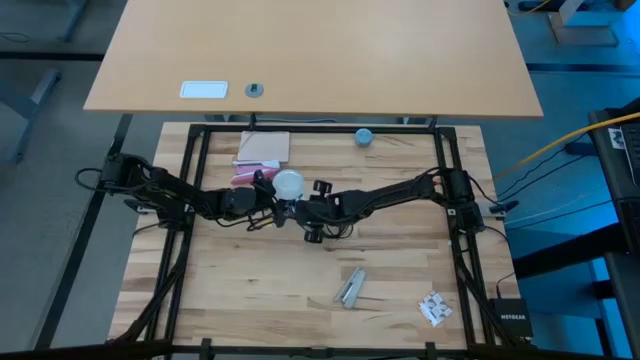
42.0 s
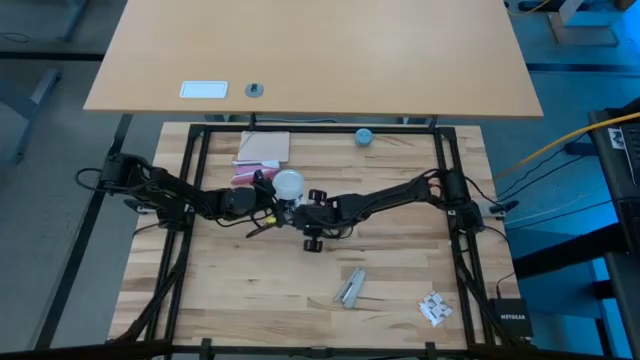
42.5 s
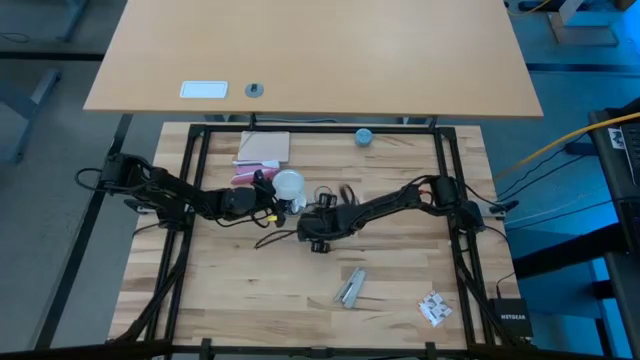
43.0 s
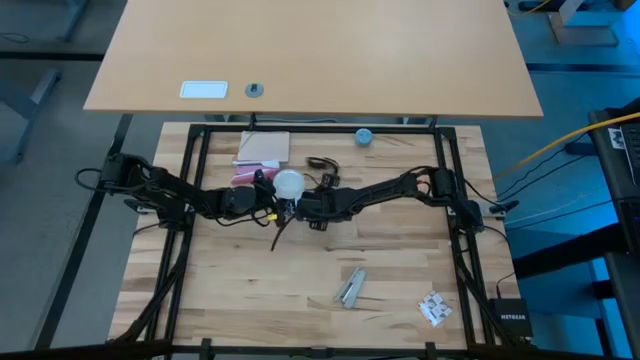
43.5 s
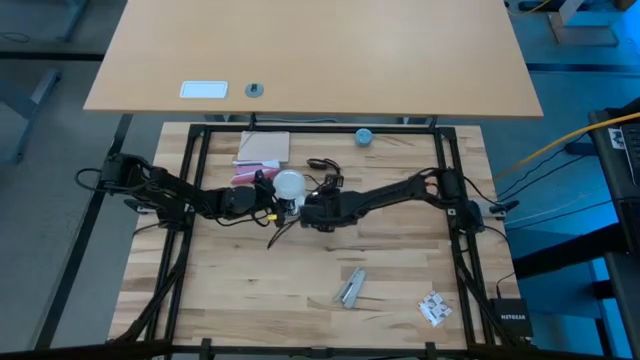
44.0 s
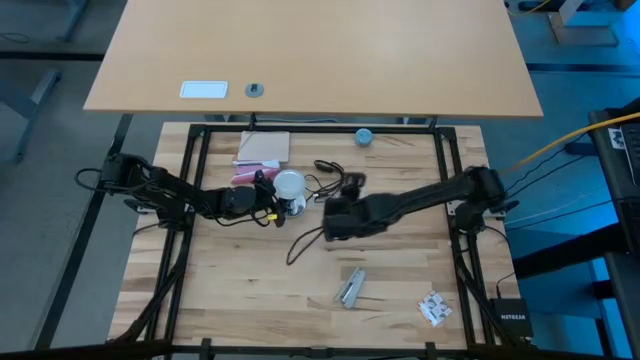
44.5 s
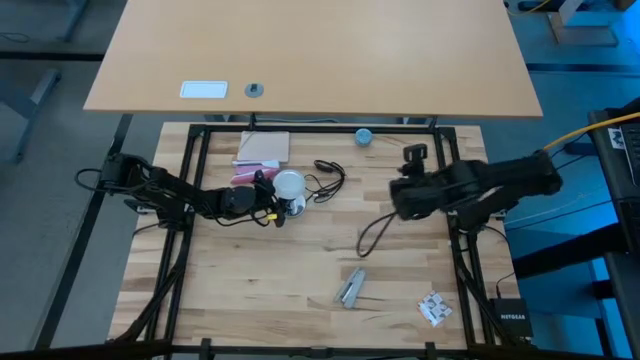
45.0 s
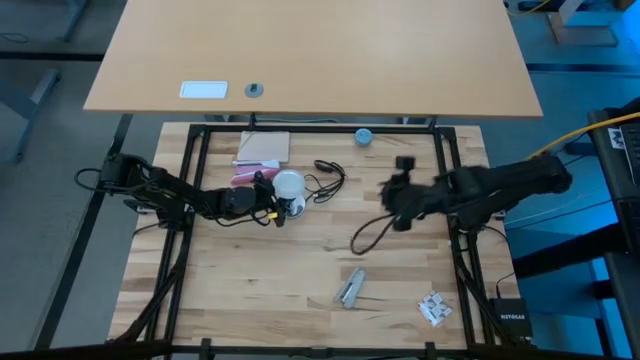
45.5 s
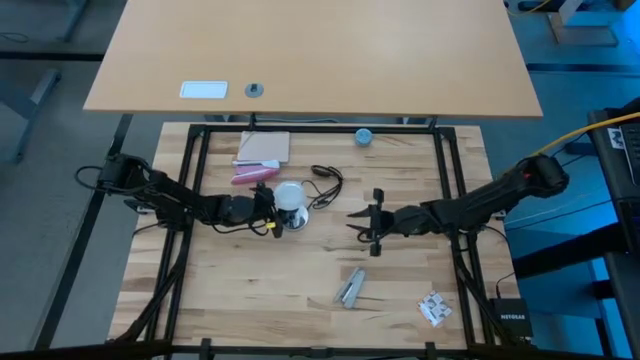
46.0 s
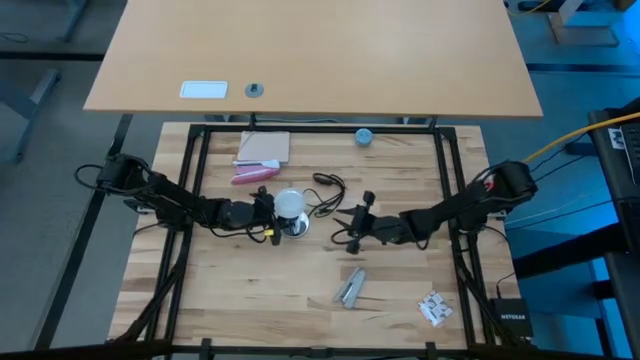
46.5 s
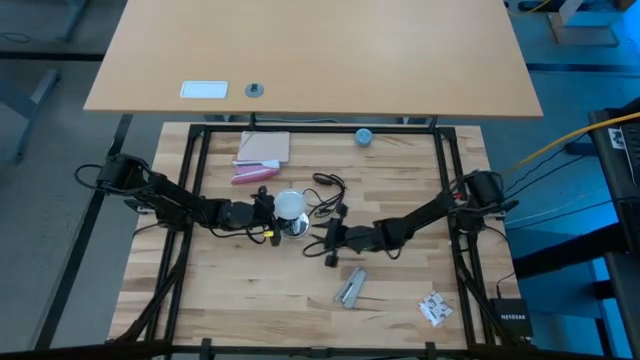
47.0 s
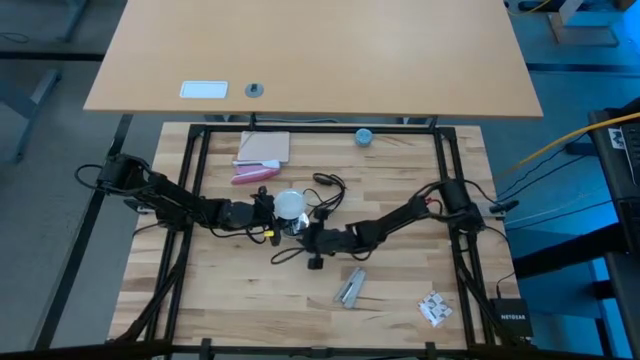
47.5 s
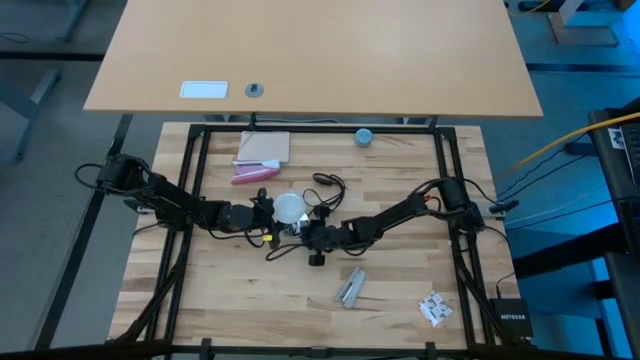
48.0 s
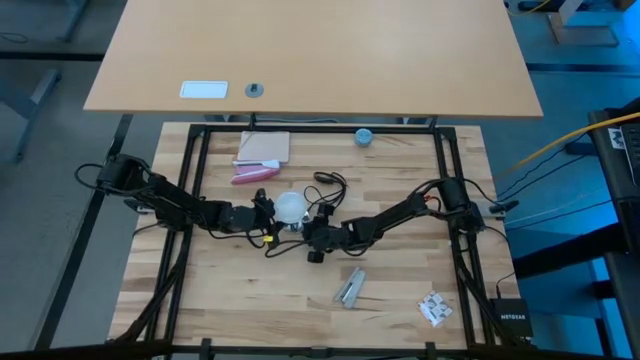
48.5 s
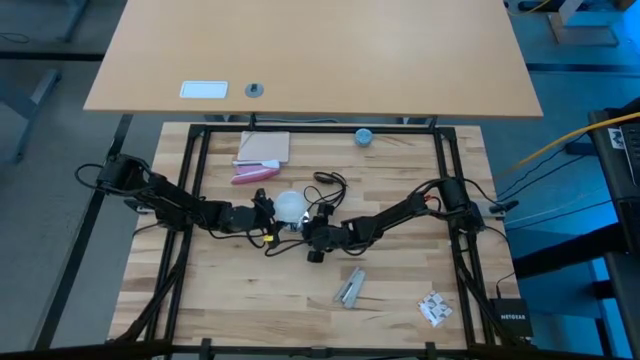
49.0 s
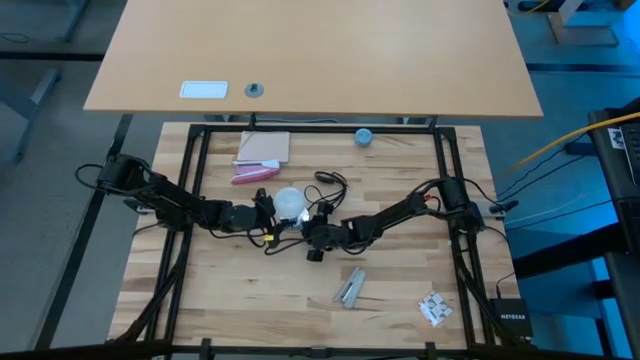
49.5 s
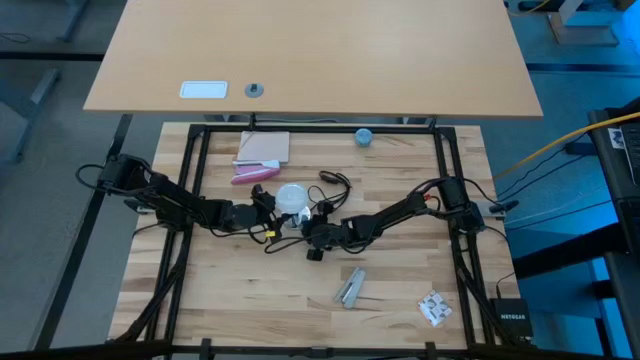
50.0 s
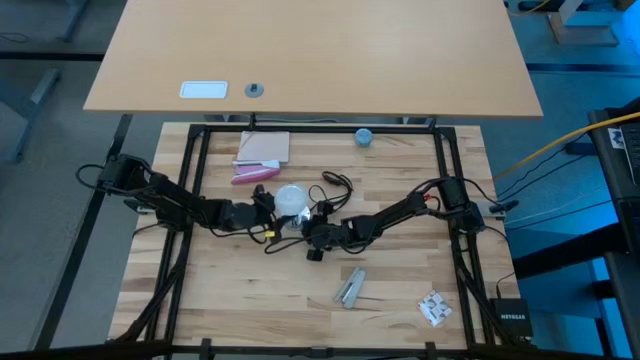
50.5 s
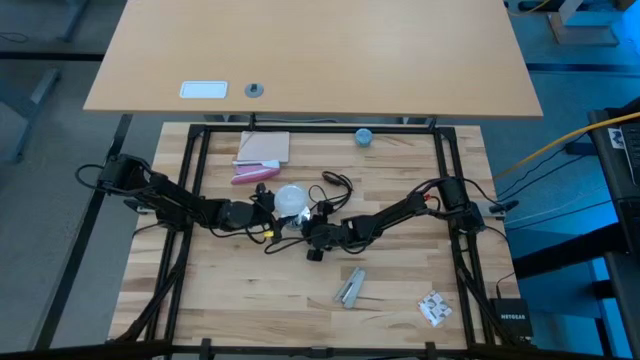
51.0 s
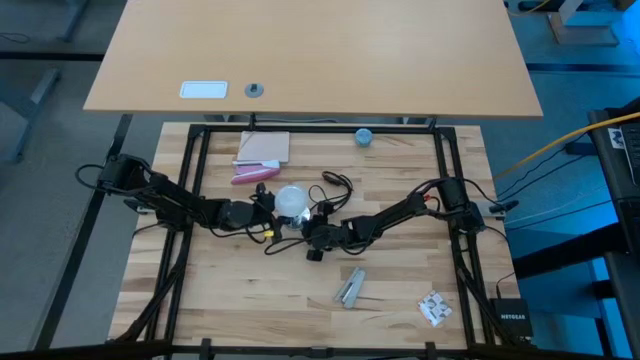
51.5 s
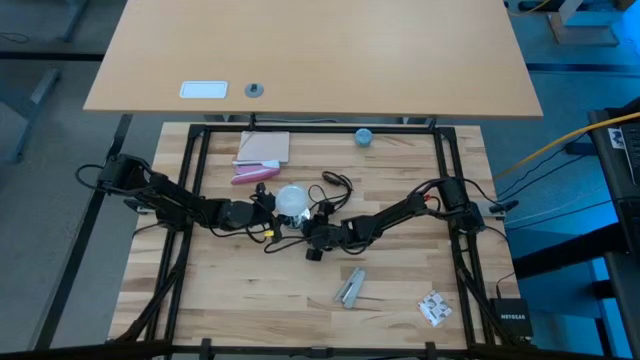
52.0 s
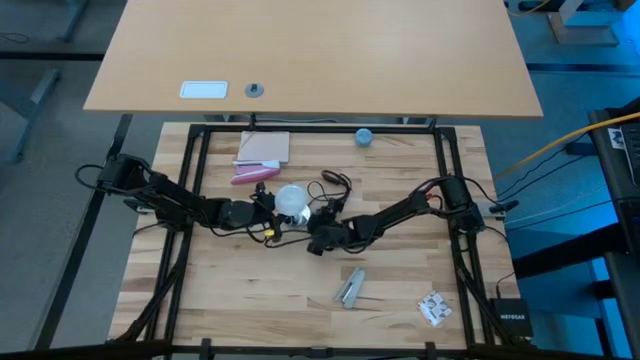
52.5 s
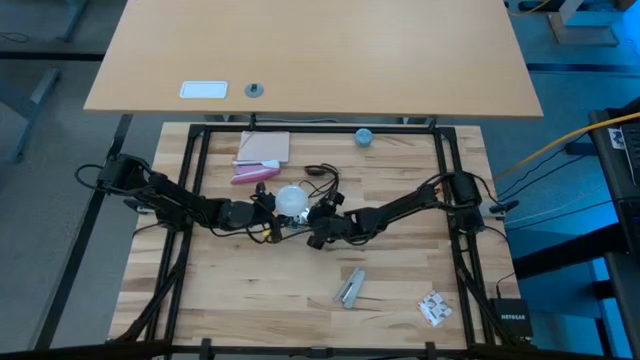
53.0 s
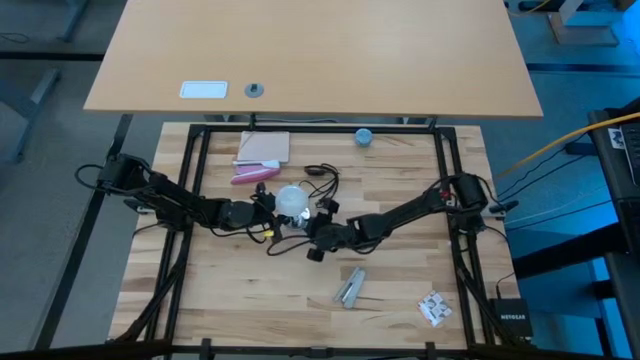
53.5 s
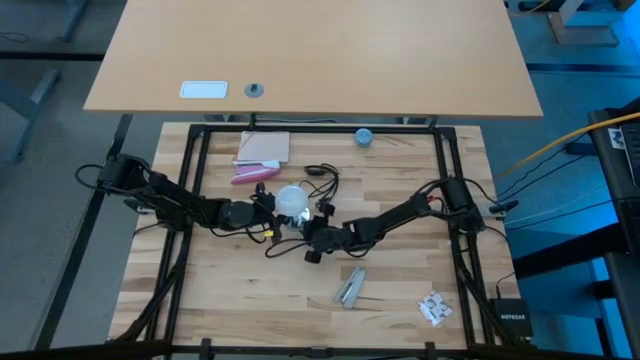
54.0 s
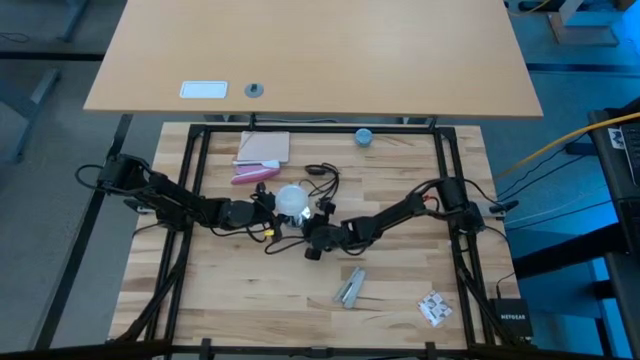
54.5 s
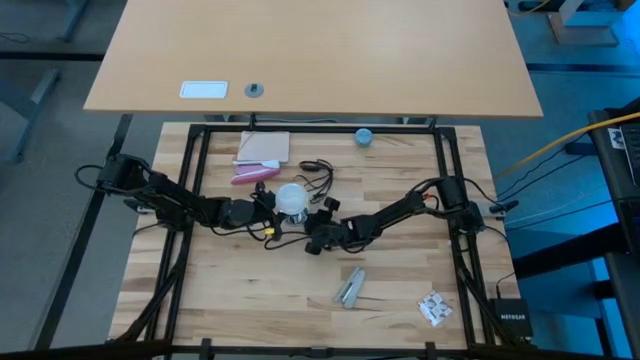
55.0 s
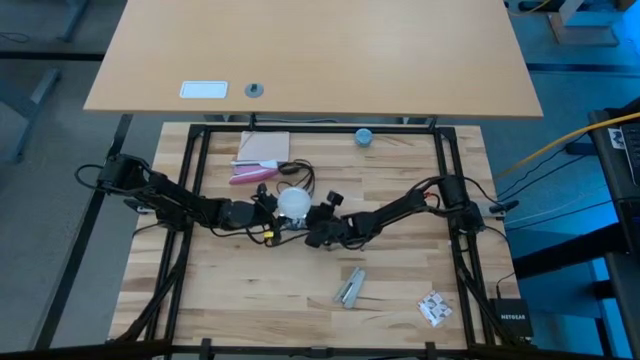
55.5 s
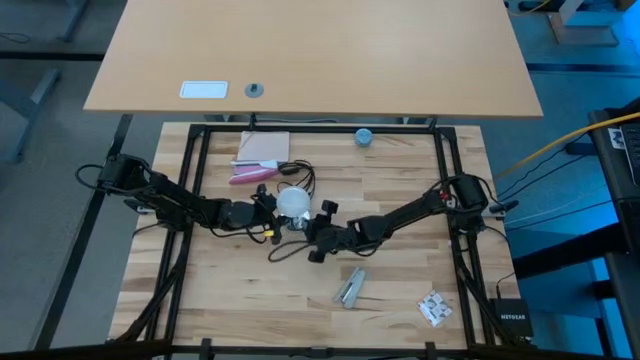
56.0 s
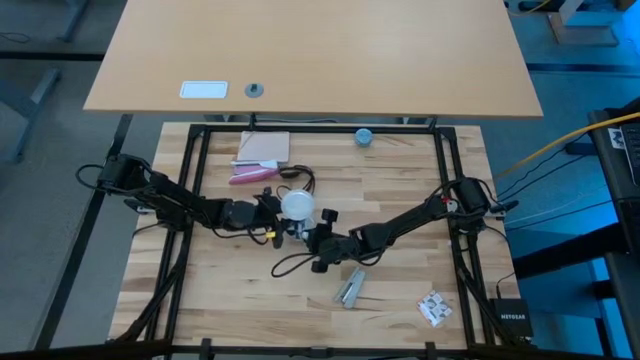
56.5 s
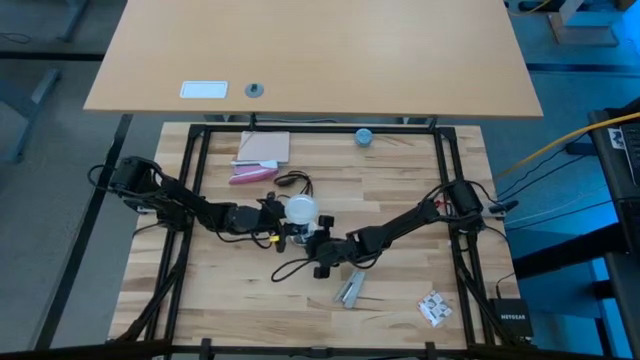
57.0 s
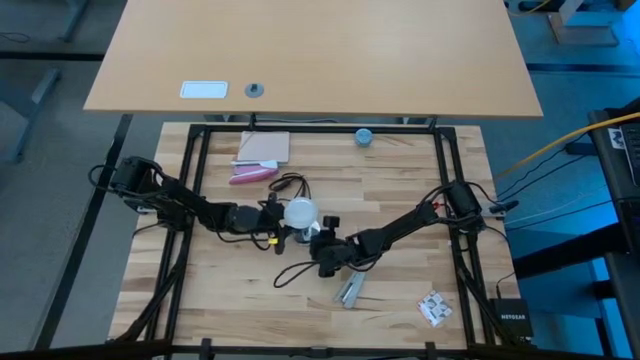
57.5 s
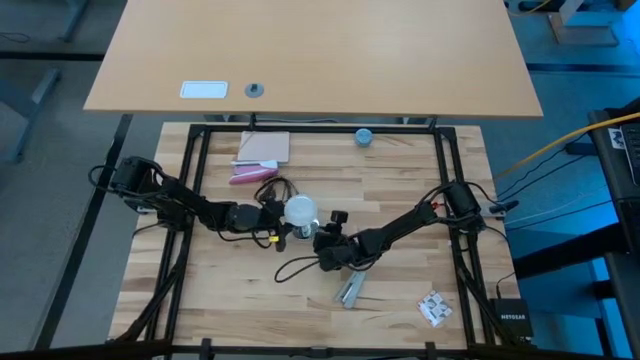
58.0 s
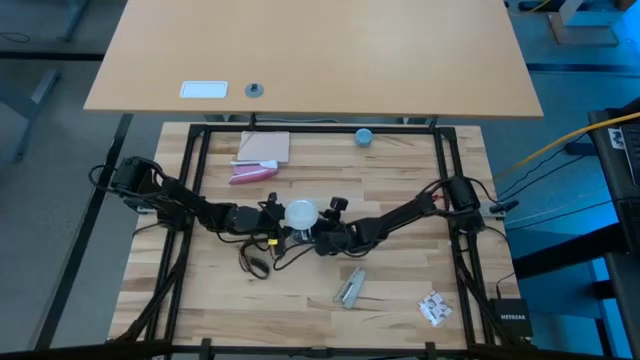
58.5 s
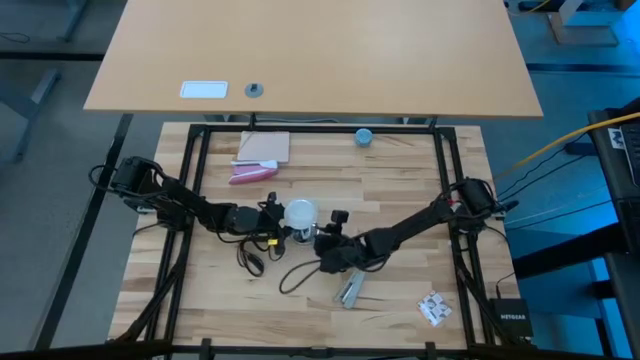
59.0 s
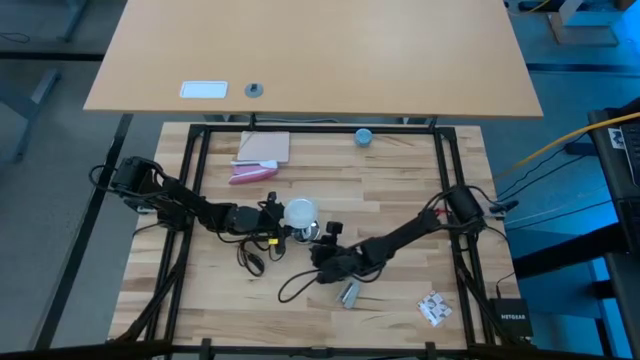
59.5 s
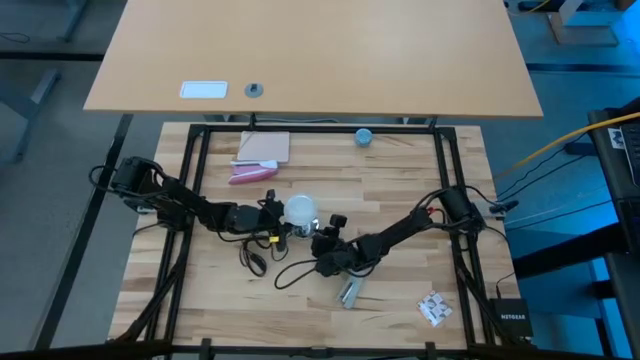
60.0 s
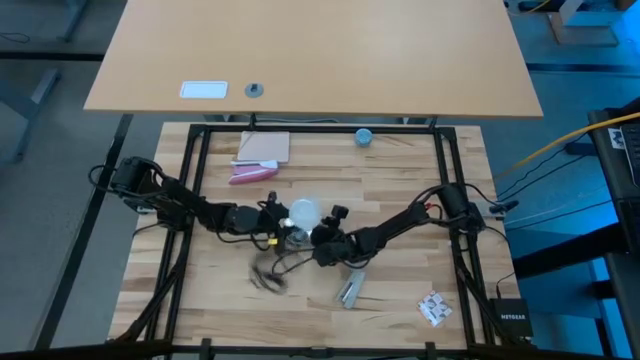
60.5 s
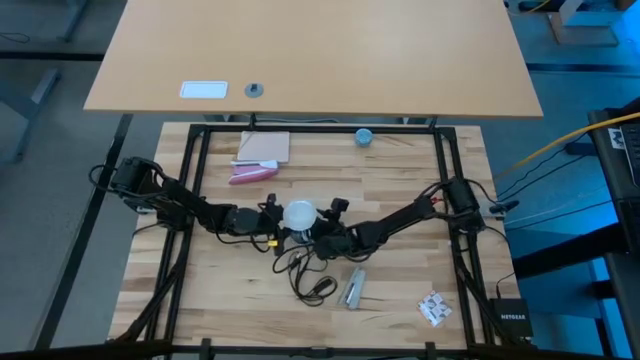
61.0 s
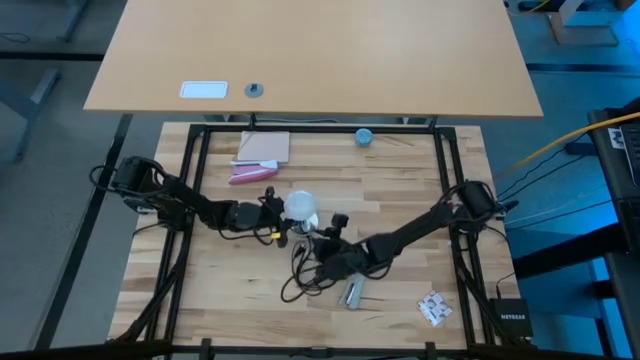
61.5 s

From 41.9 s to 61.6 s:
Task: Screw lightbulb
Insert the lightbulb into the lamp

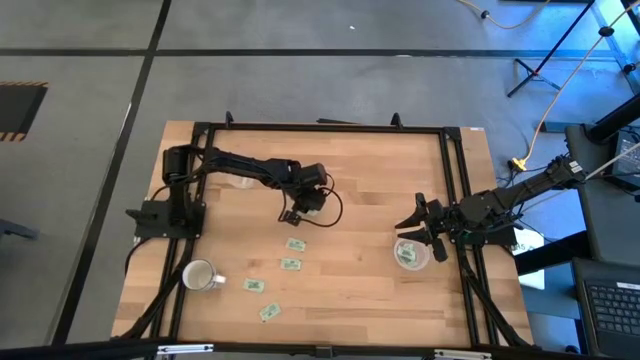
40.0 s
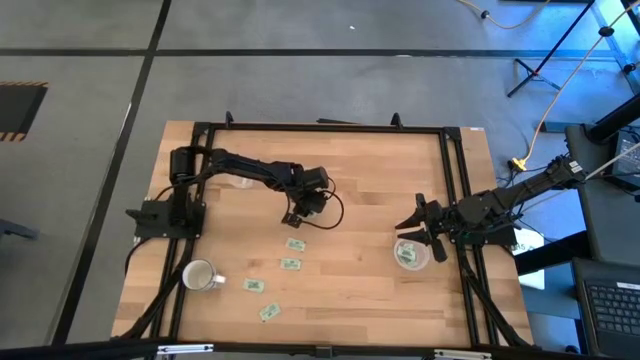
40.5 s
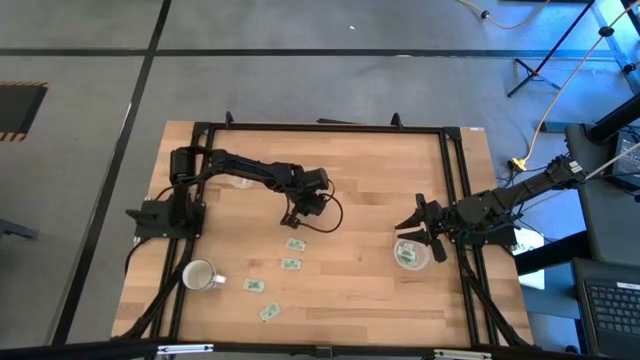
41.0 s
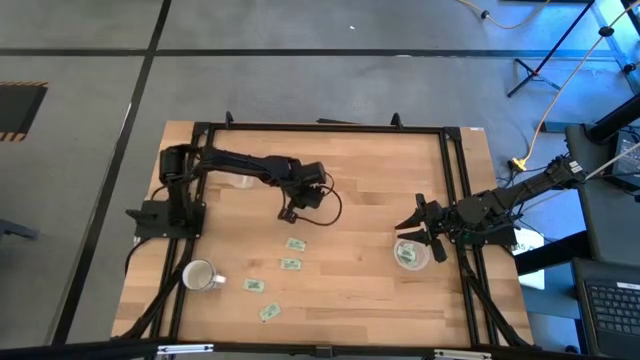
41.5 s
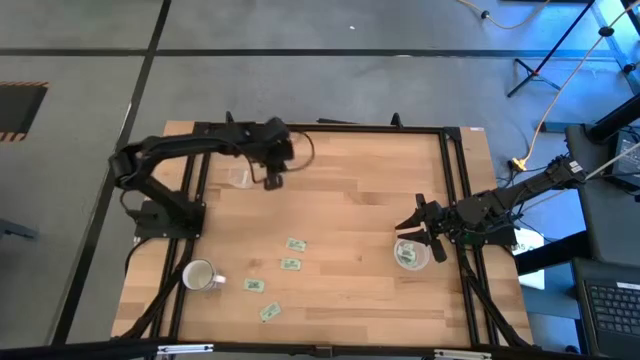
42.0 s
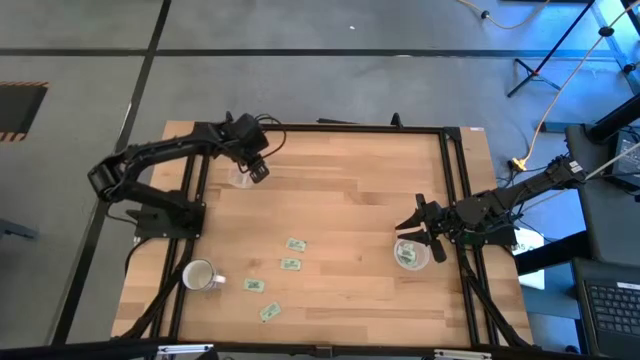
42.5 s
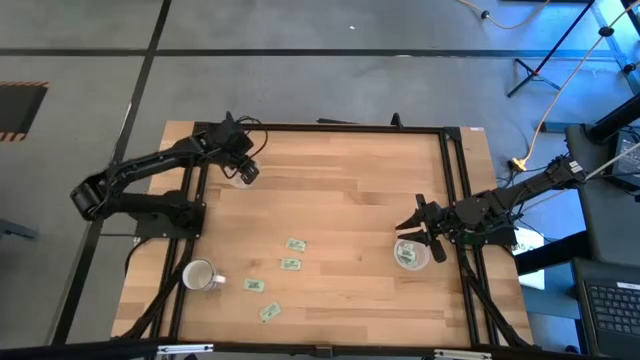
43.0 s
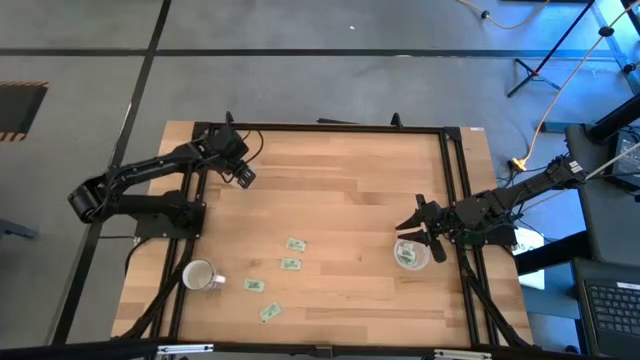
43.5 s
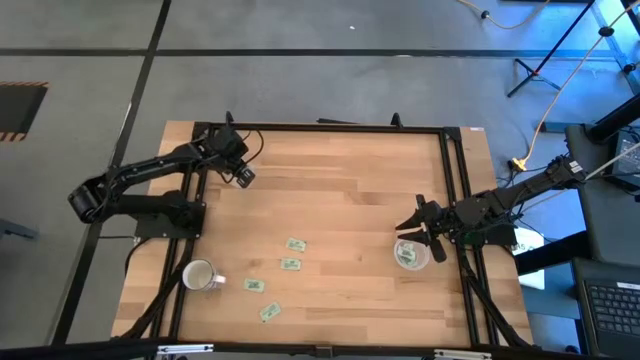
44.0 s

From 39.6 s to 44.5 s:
Task: Pick and place Stevia / Truvia into bins
Put the stevia packet into the square transparent container
